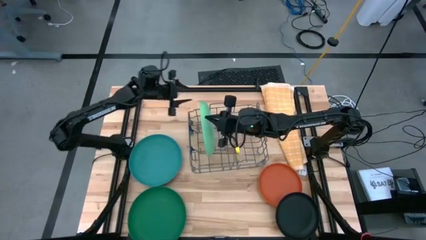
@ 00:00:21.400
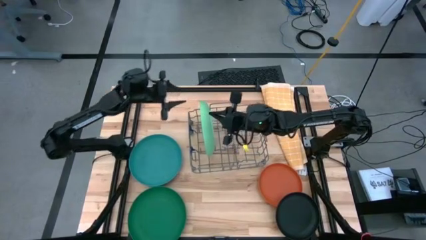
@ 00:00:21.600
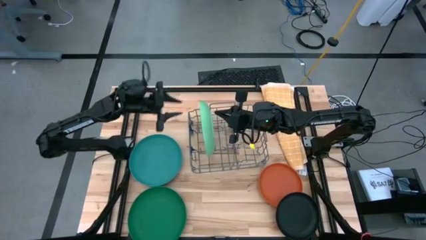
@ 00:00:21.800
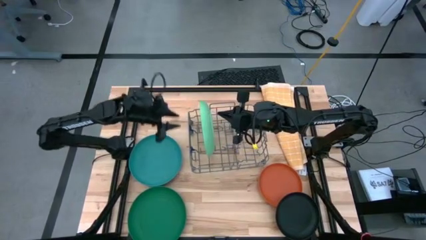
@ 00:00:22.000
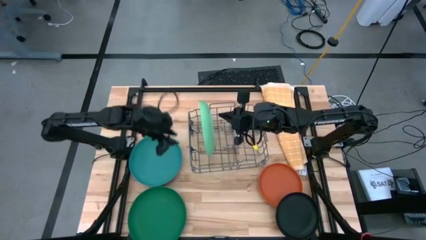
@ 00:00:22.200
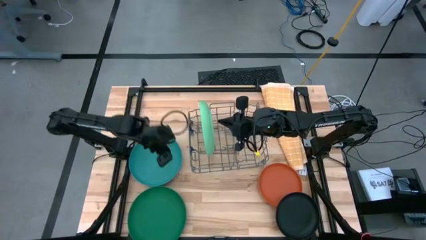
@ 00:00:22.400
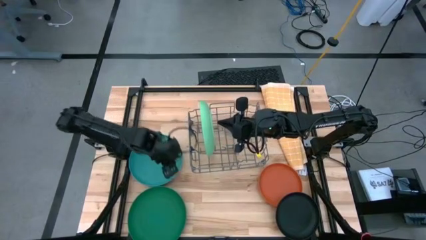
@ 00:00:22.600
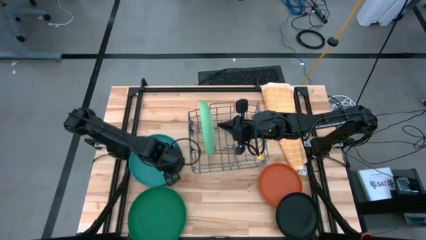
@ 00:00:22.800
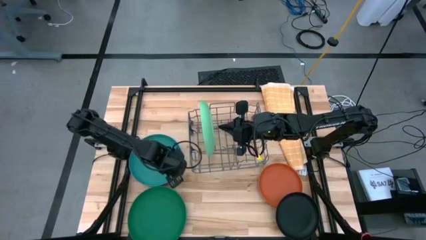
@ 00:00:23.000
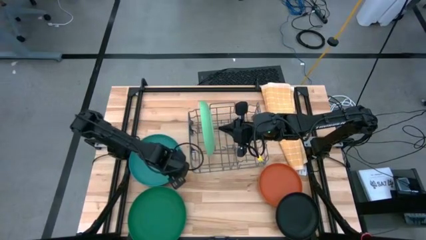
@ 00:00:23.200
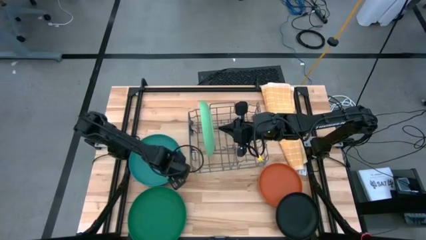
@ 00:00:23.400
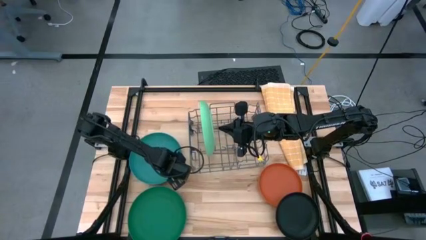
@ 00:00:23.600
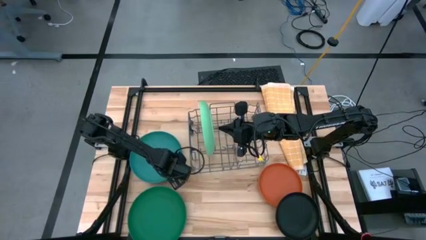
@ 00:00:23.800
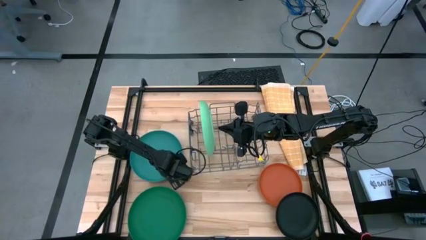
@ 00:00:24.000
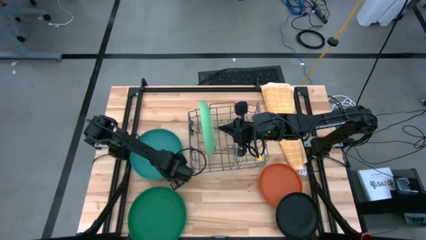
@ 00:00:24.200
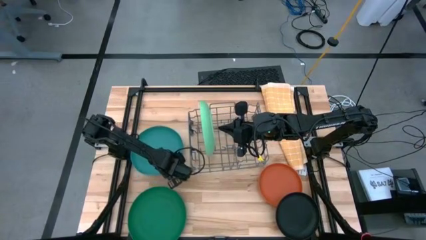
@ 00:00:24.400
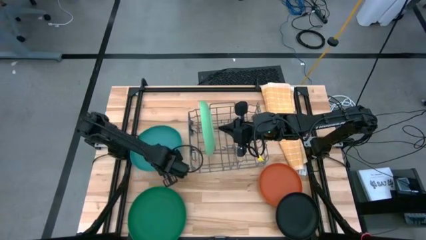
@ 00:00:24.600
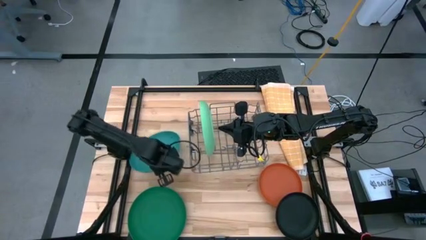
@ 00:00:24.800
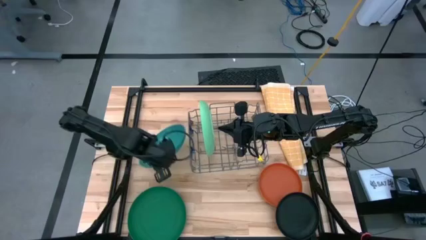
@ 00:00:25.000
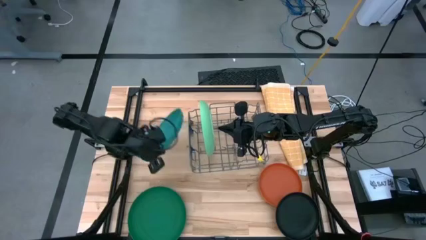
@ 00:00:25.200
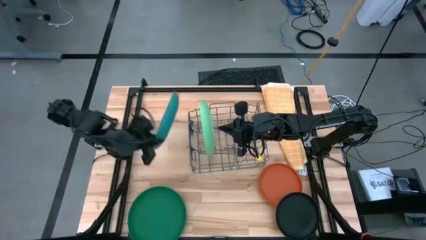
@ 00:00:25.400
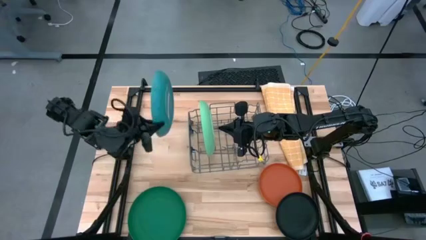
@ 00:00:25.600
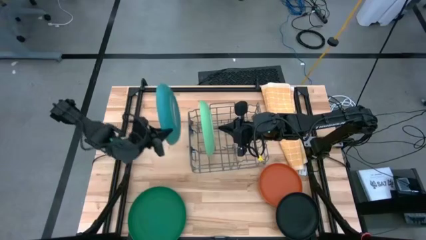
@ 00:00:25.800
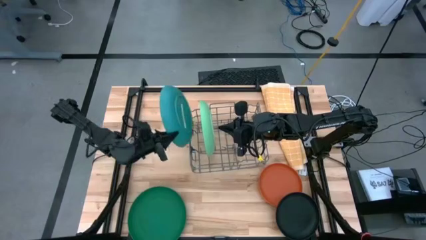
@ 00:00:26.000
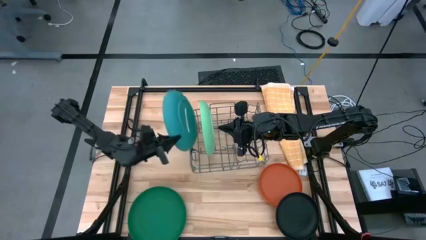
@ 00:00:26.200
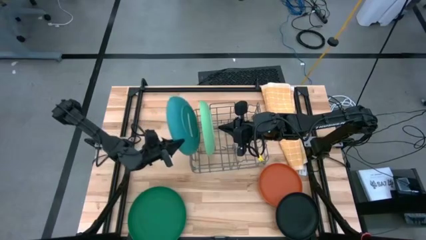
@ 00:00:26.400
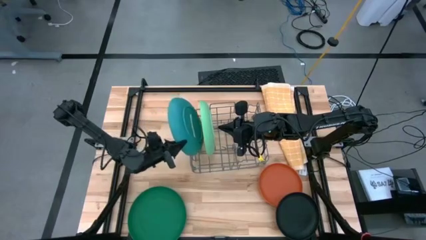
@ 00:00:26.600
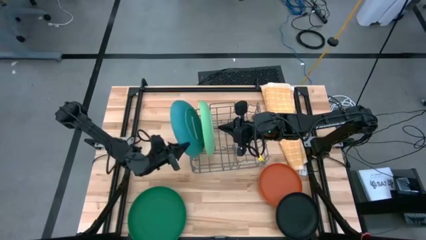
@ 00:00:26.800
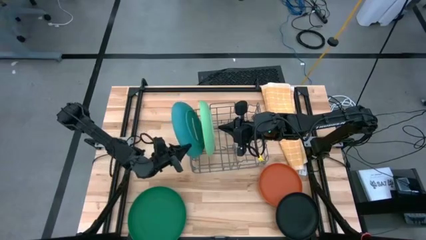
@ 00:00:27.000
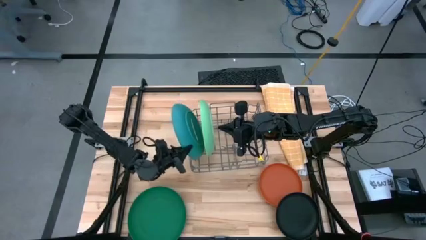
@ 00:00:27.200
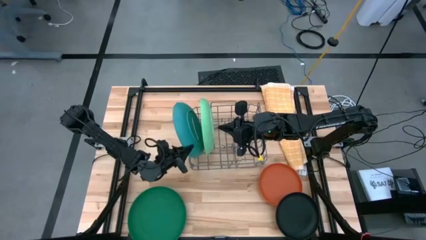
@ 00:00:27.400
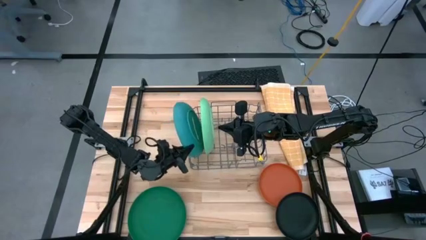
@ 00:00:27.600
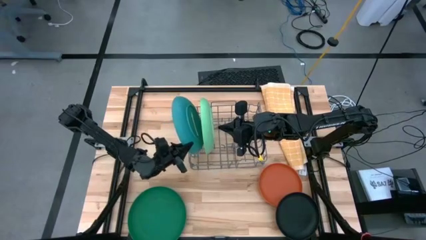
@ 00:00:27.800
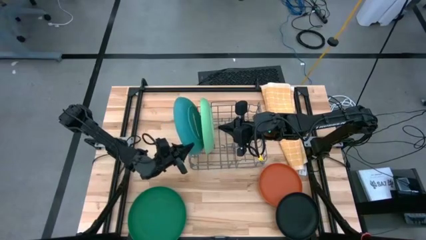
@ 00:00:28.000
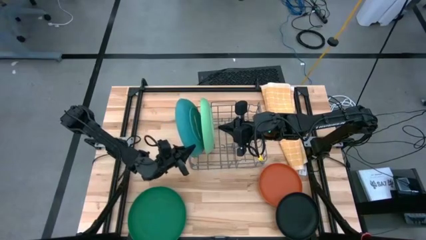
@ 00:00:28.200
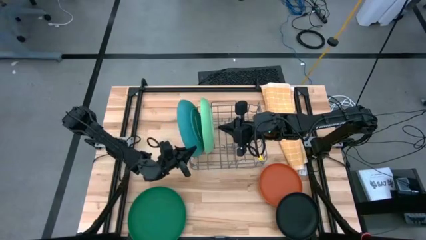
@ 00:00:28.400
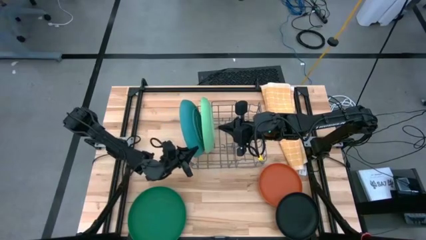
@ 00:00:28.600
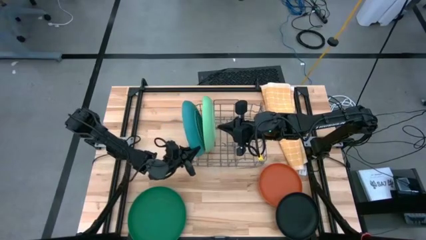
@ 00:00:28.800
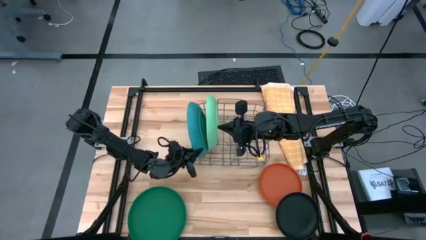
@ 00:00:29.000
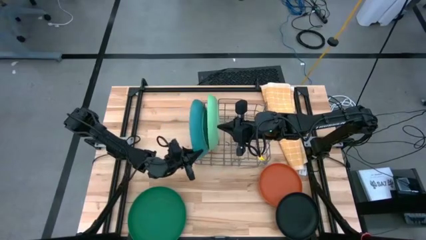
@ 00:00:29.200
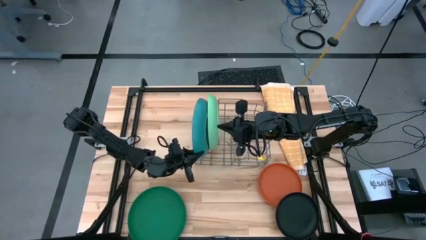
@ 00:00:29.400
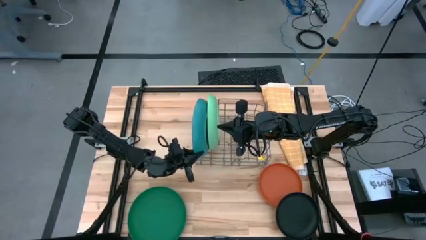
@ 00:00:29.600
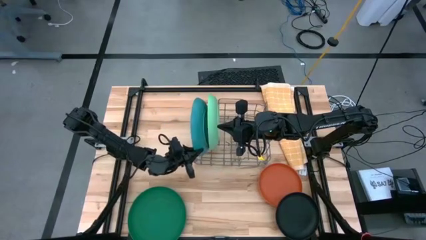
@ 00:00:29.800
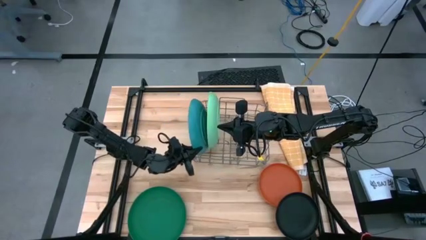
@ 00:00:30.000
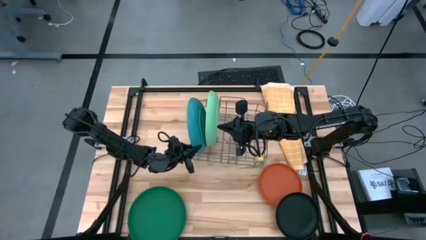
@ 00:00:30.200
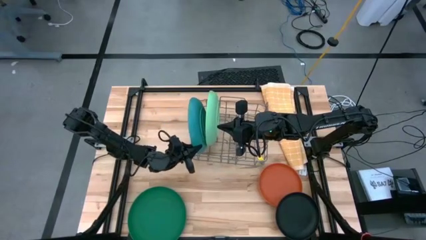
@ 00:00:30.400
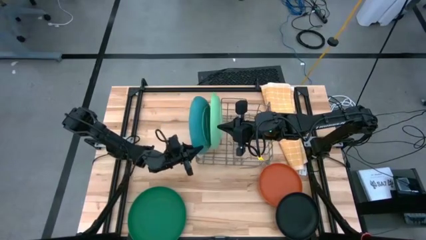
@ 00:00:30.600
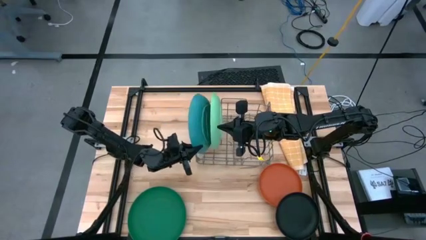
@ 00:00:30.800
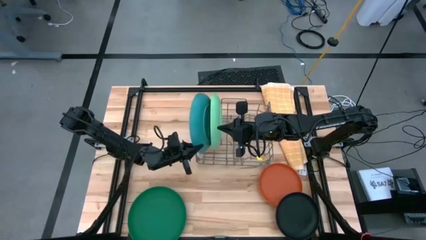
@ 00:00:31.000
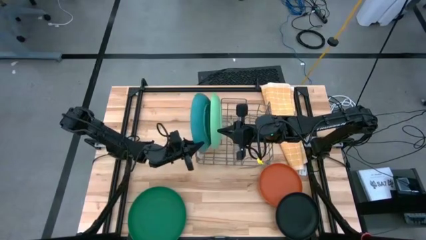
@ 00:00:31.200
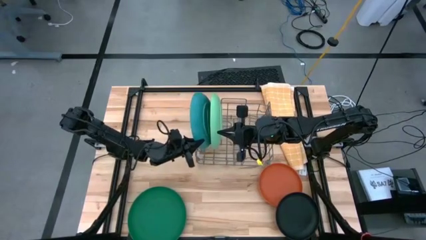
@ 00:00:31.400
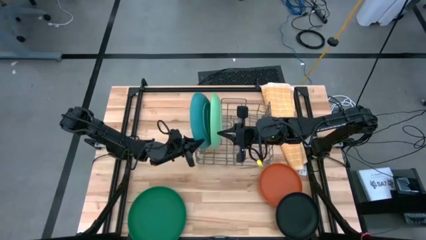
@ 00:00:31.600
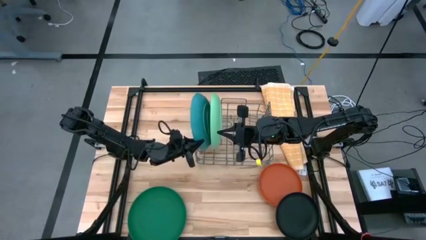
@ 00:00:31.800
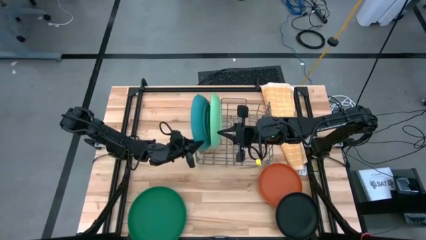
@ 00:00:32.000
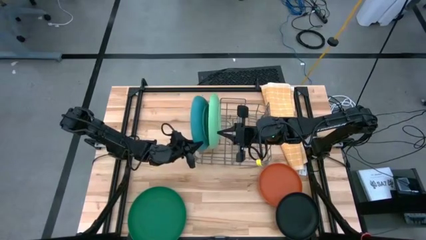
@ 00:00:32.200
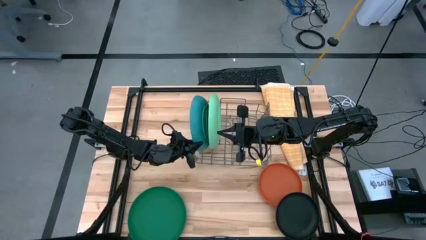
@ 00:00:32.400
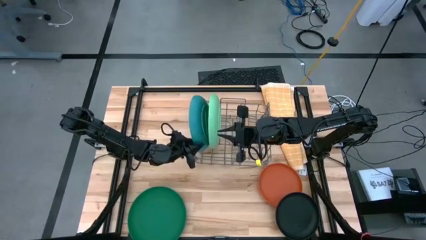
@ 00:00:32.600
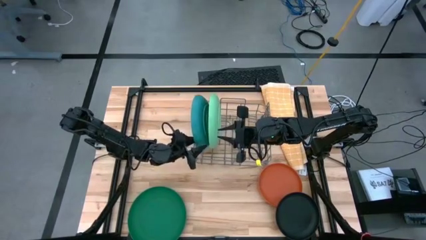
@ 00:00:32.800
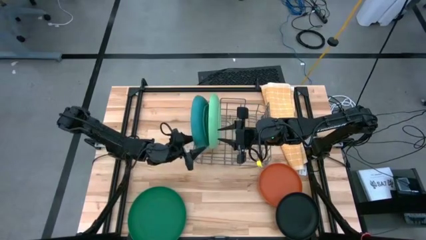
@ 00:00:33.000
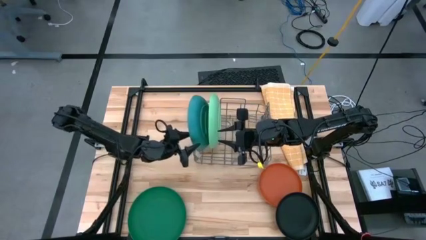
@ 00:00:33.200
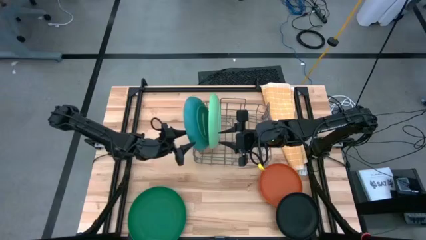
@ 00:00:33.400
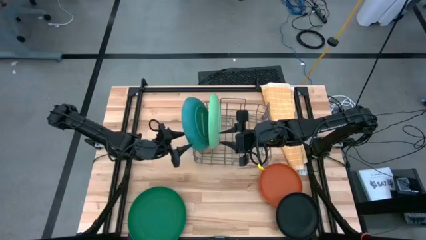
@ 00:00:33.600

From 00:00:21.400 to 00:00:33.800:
Task: Sort dishes
Put the blue plate in the dishwasher rack
